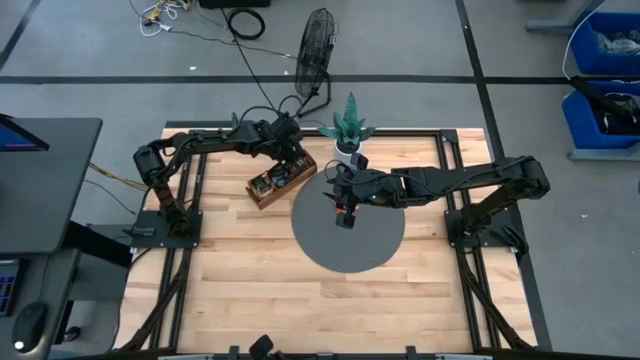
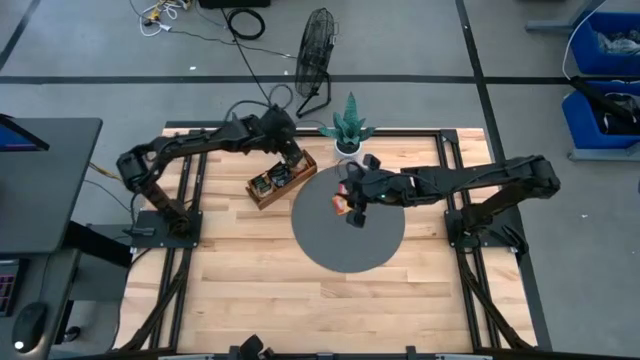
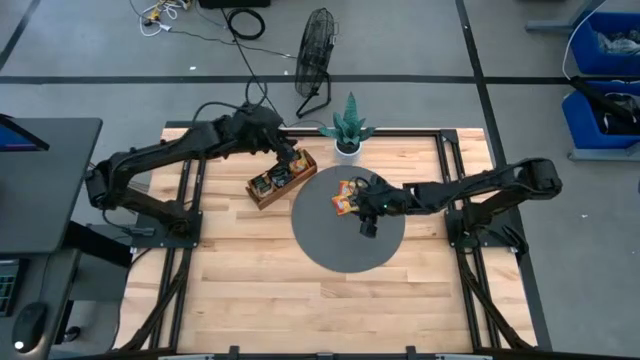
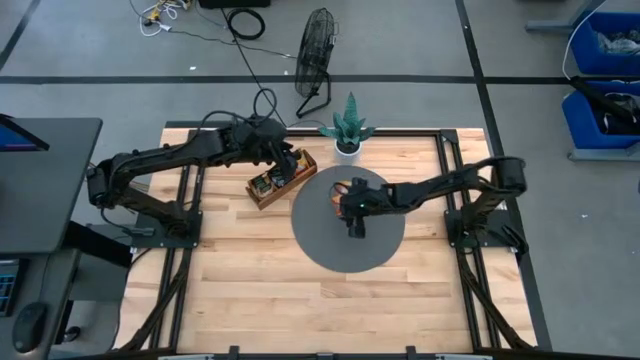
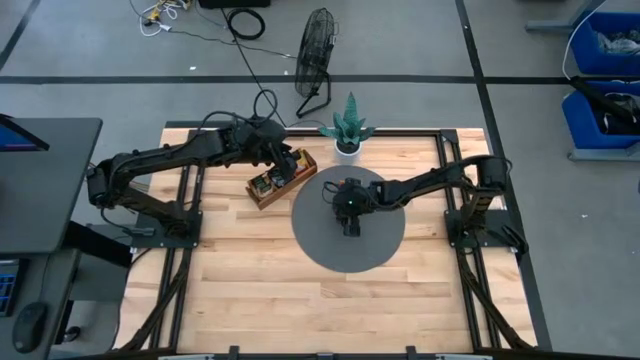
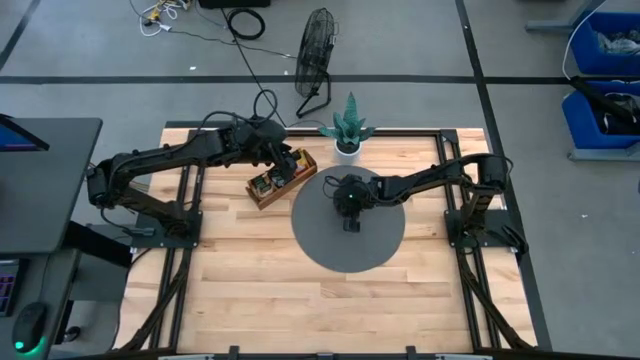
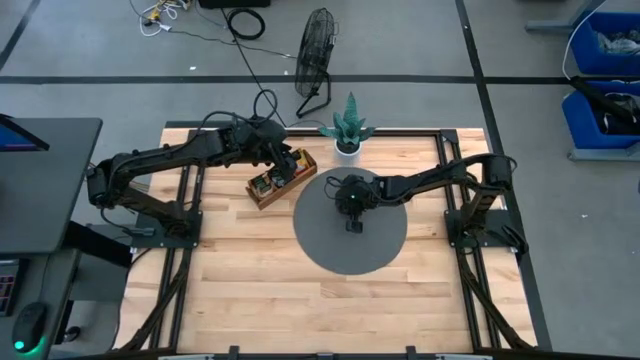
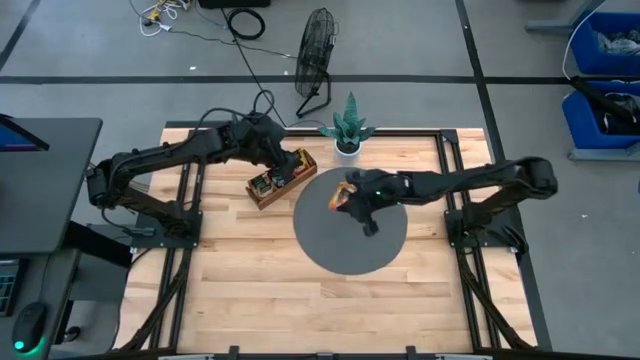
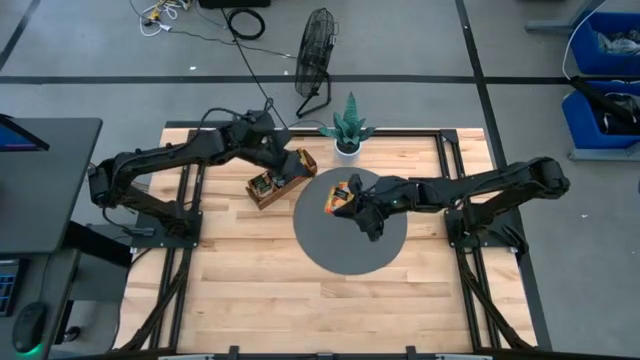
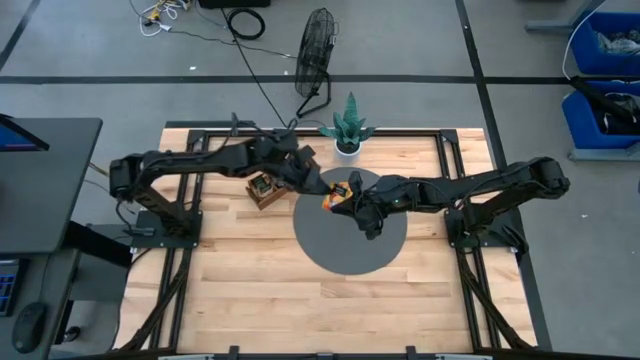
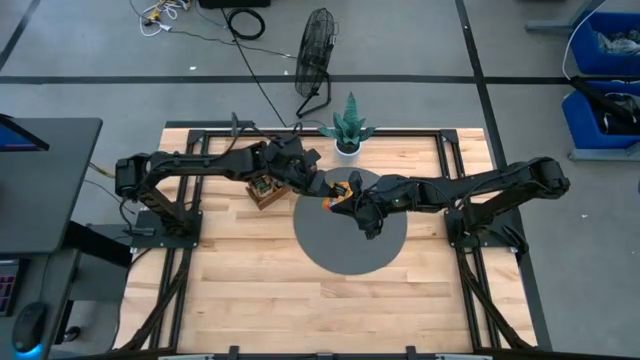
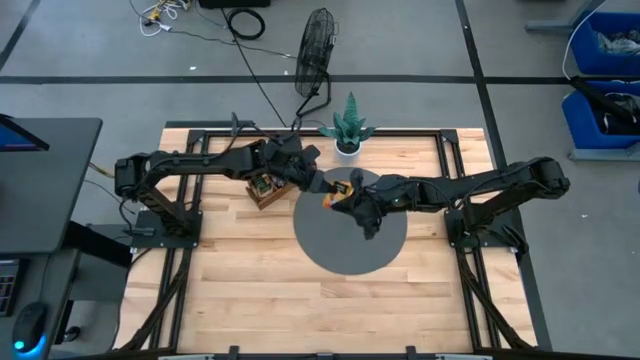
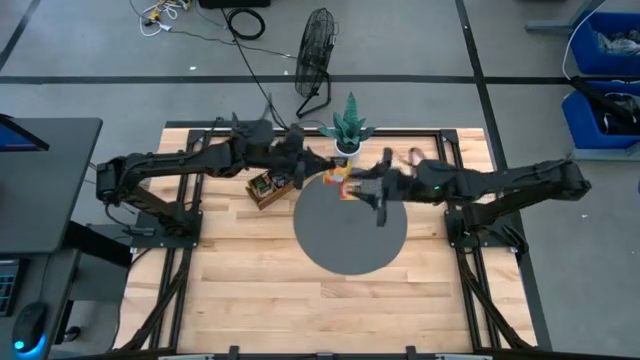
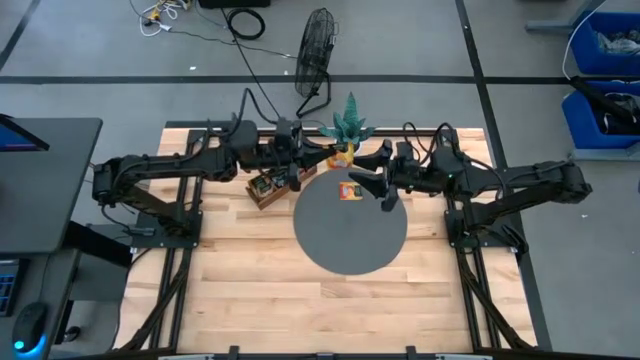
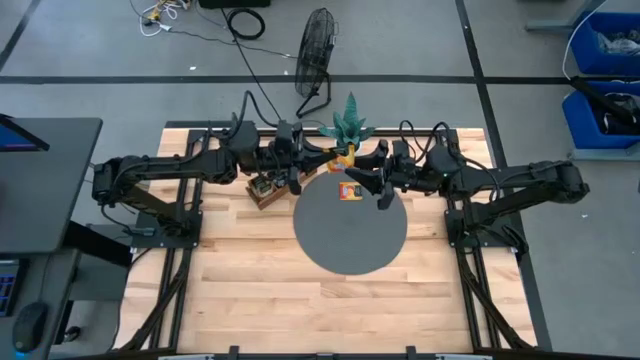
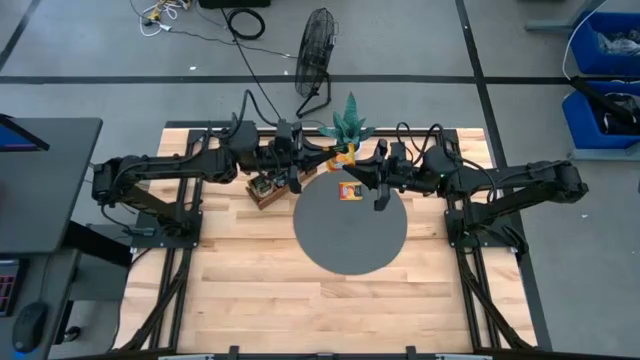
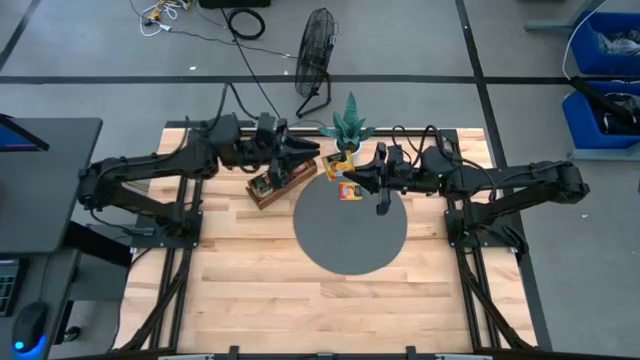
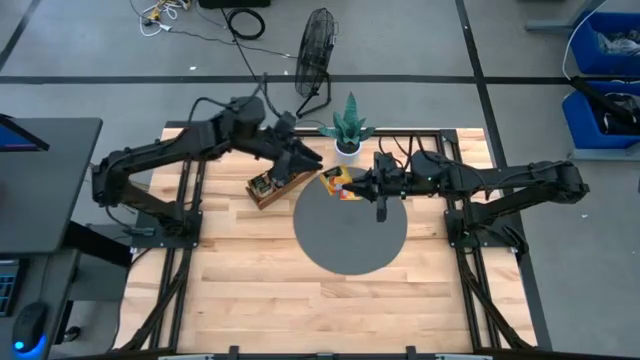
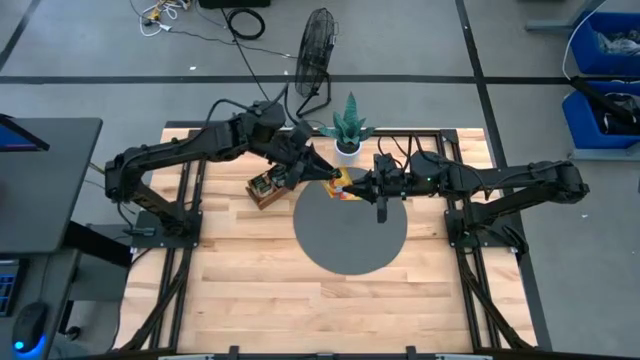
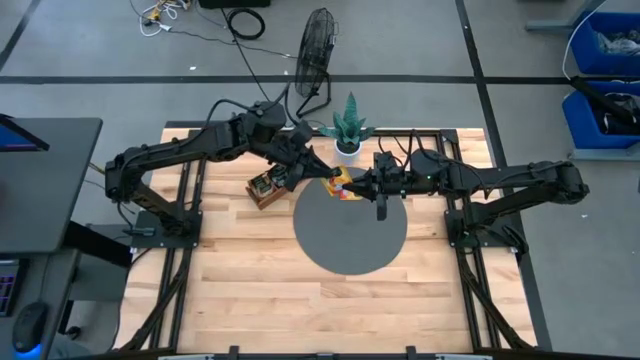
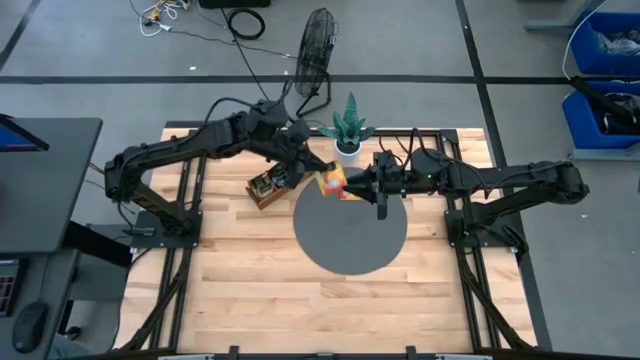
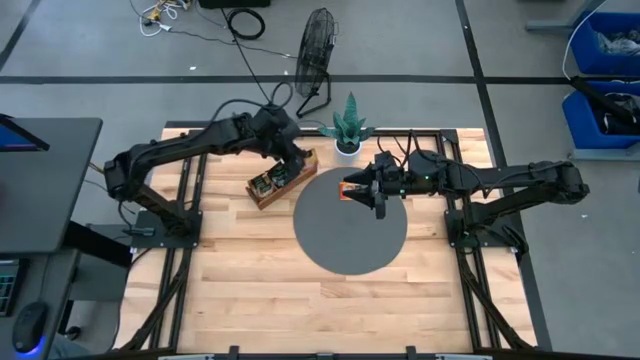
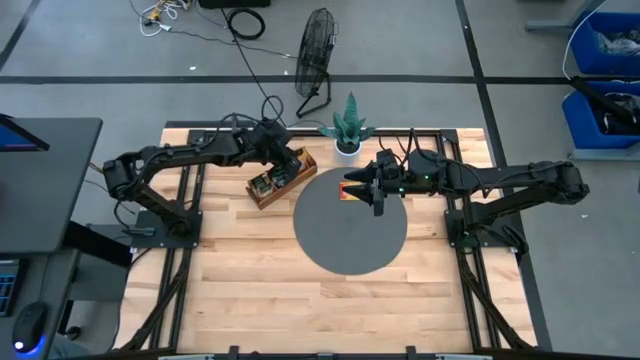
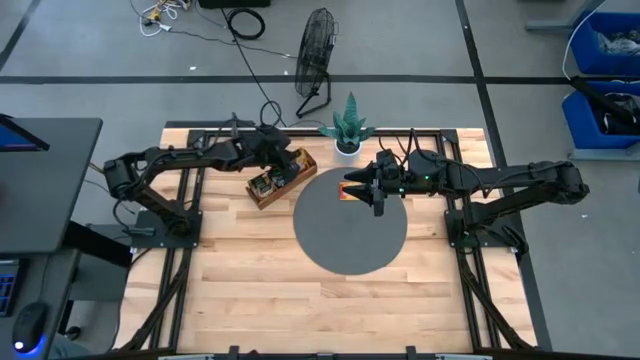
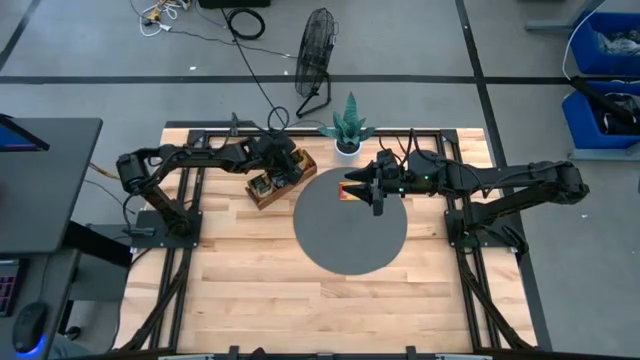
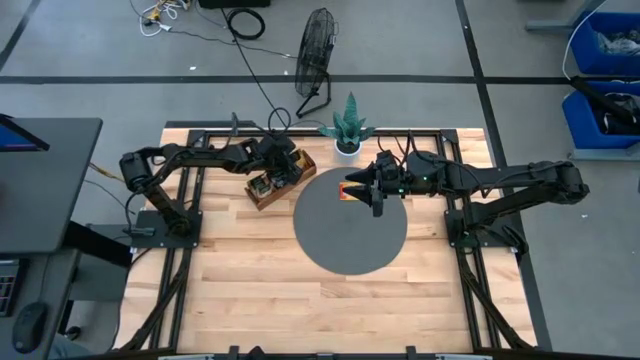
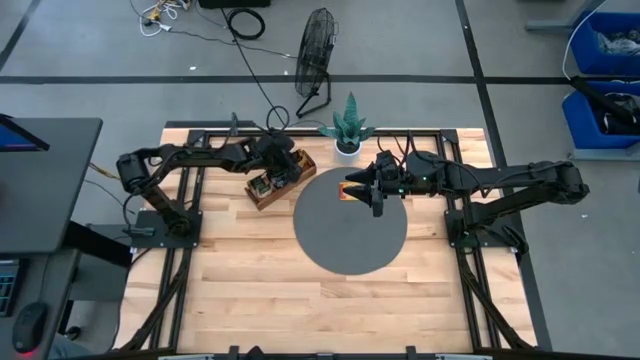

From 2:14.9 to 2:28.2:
Task: Pick & Place Tea
Put the orange tea bag into the right section of the wooden organizer

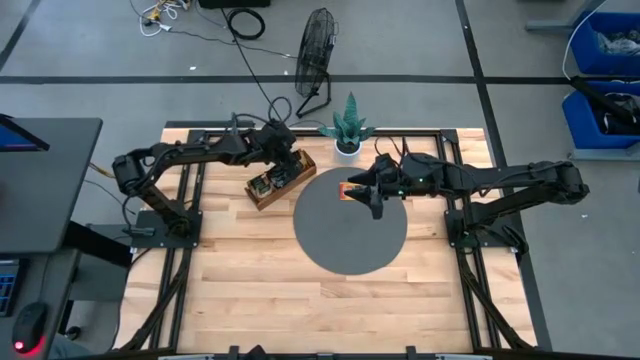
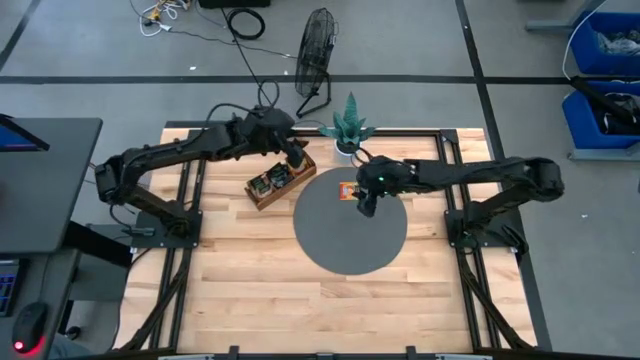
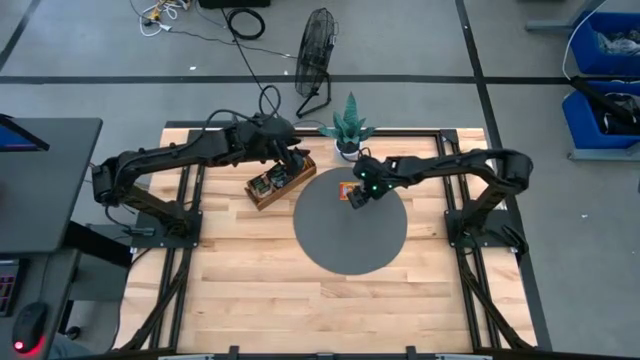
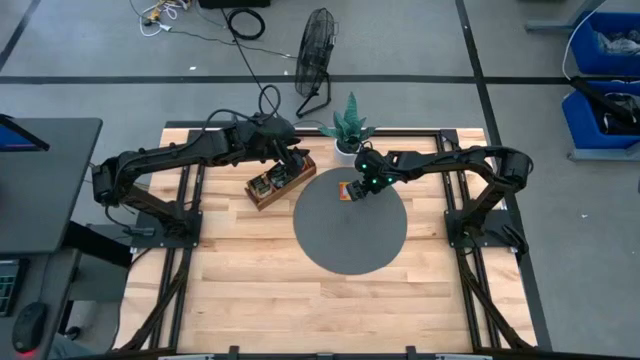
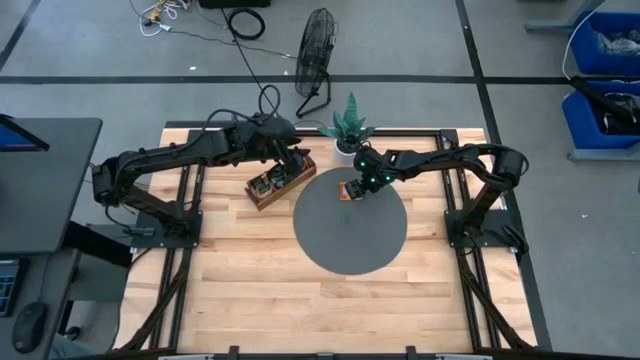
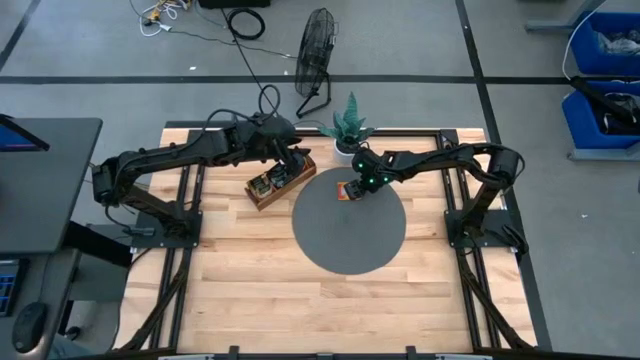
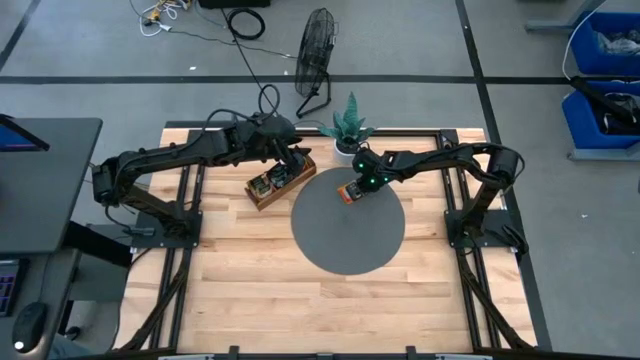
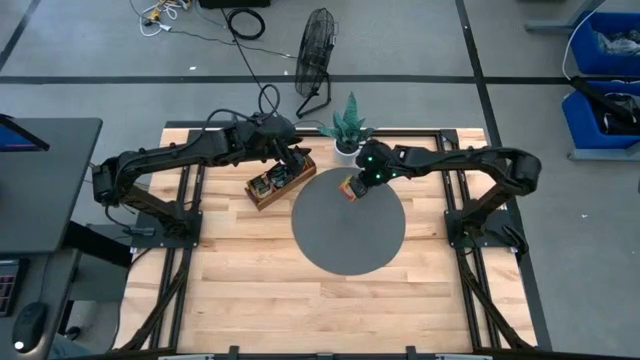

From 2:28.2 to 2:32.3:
Put the orange tea bag into the right section of the wooden organizer

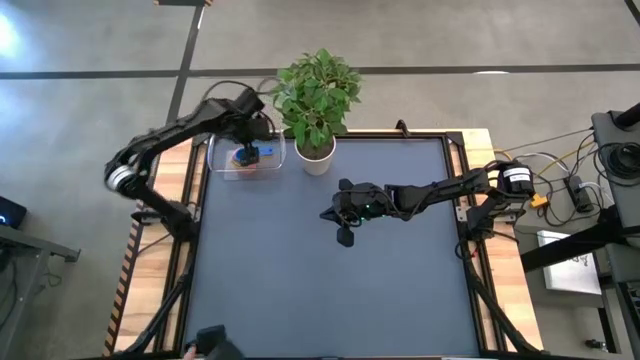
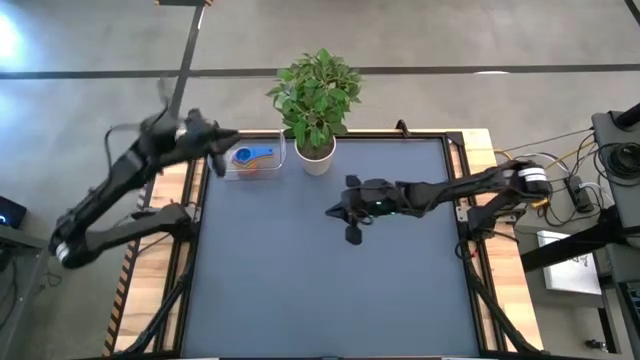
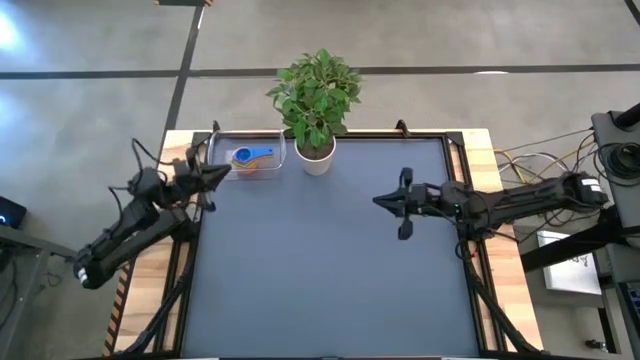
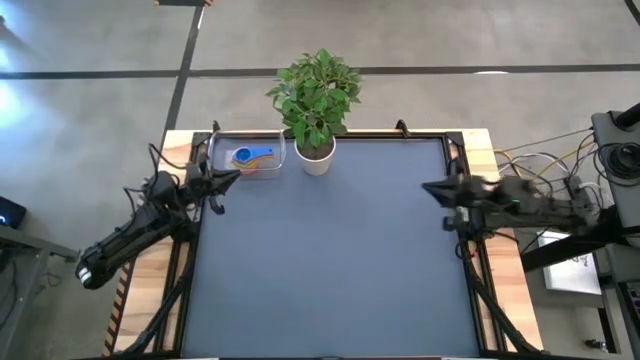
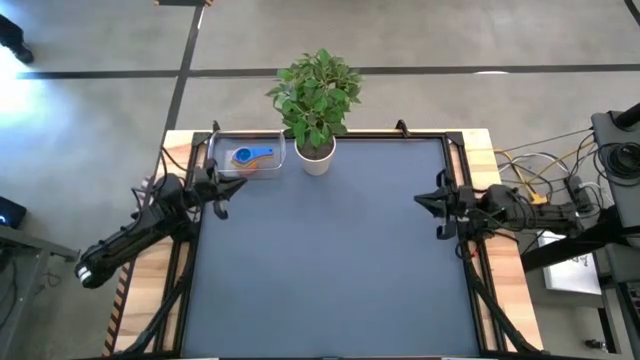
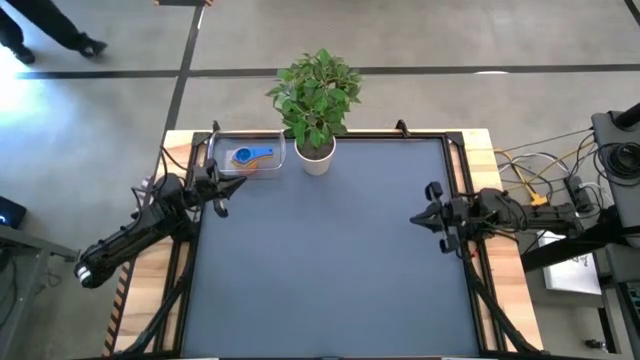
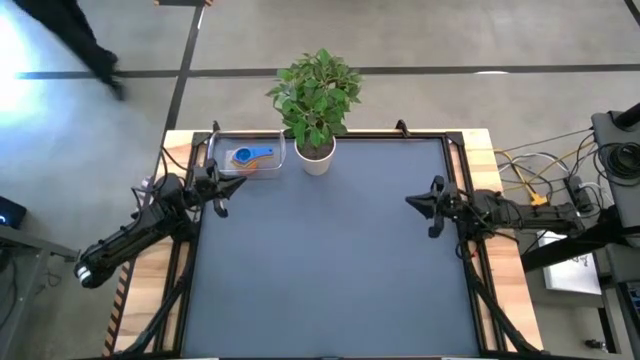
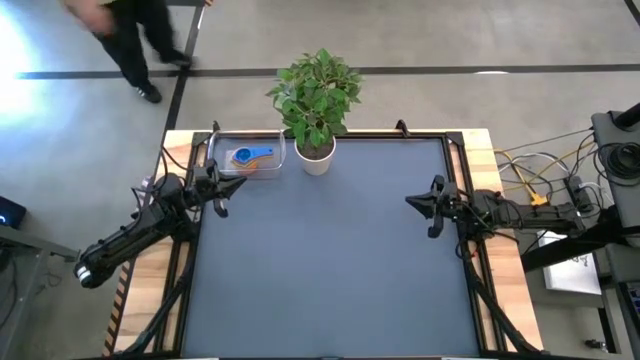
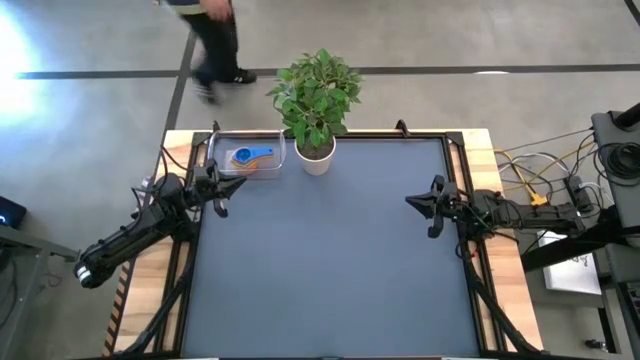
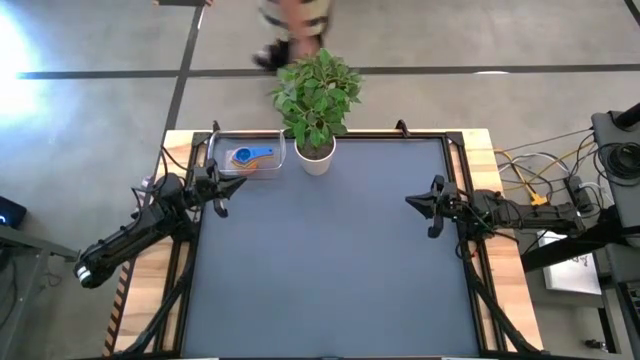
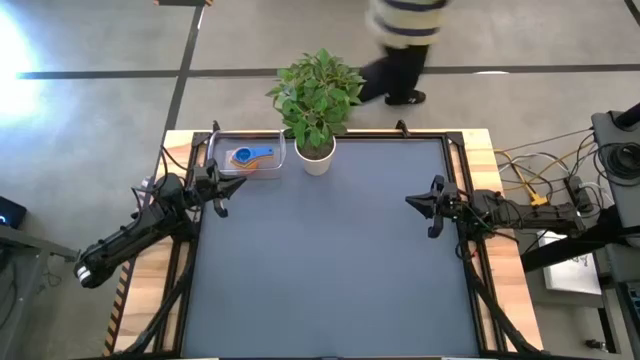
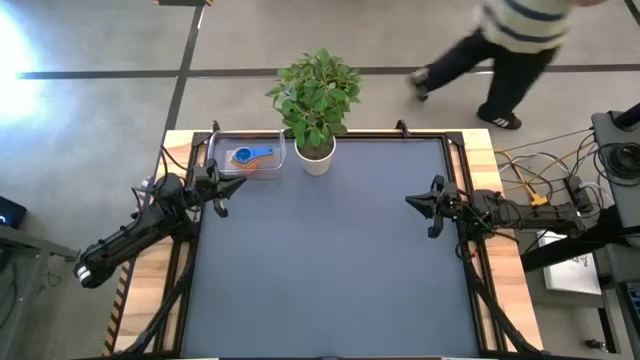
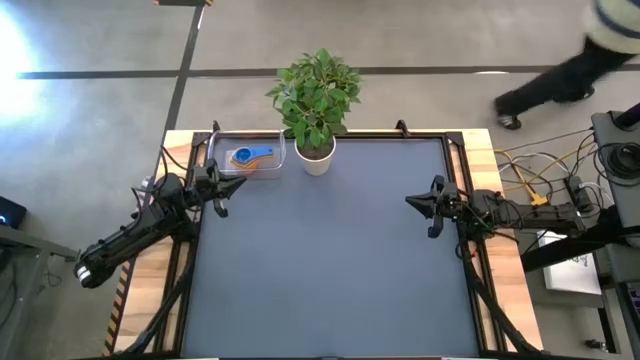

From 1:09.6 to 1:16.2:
Task: Nest measuring cups in basket
Return to Home Position
